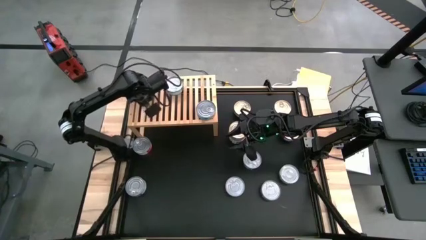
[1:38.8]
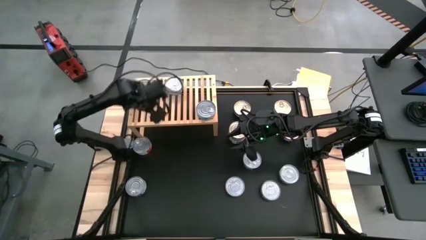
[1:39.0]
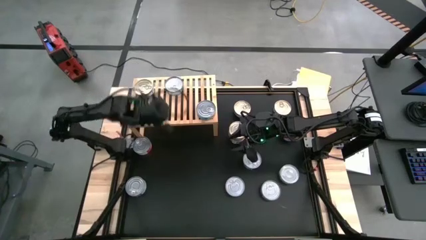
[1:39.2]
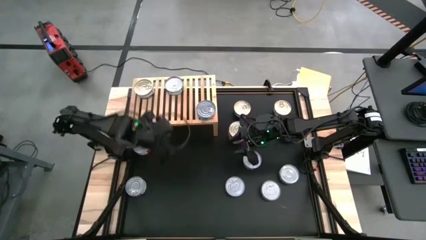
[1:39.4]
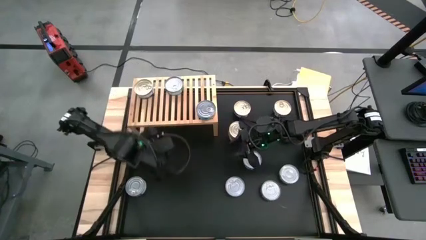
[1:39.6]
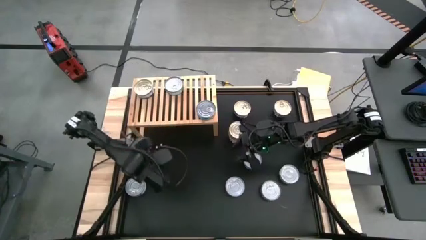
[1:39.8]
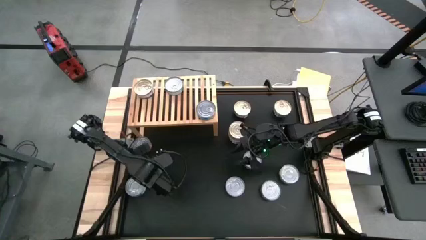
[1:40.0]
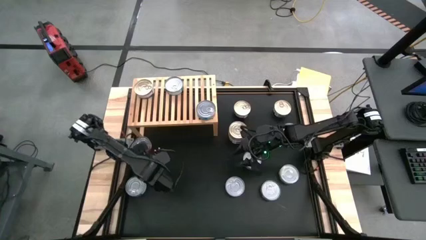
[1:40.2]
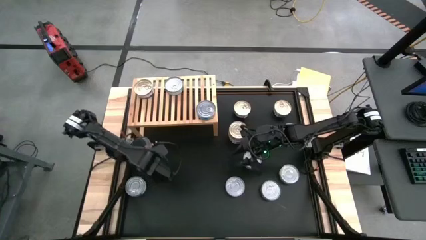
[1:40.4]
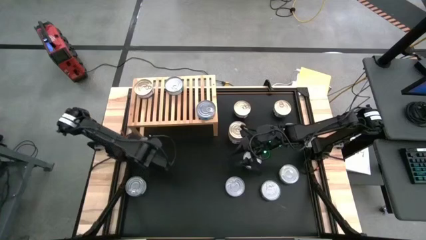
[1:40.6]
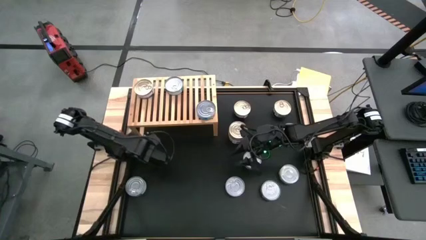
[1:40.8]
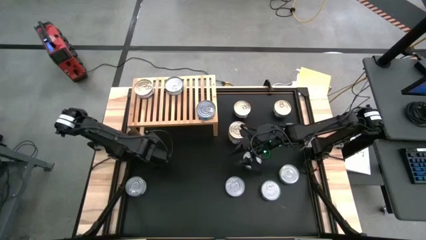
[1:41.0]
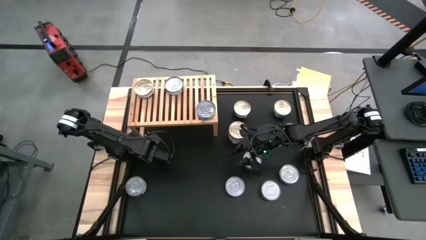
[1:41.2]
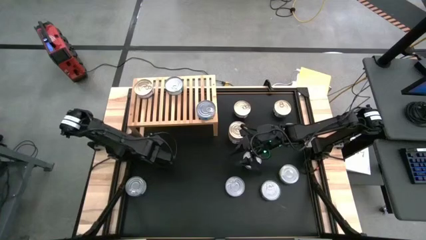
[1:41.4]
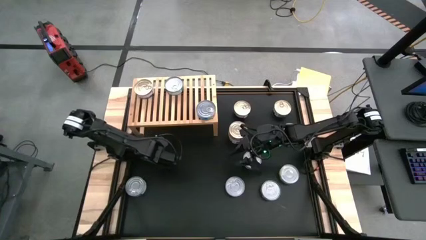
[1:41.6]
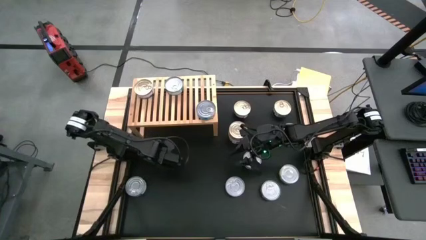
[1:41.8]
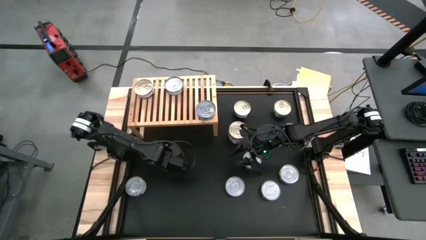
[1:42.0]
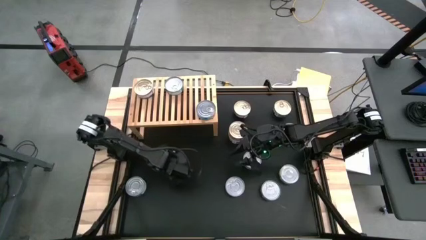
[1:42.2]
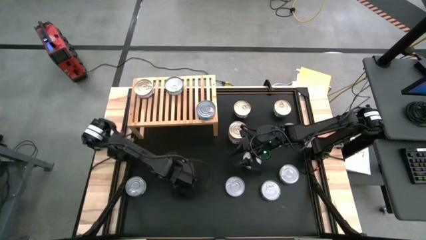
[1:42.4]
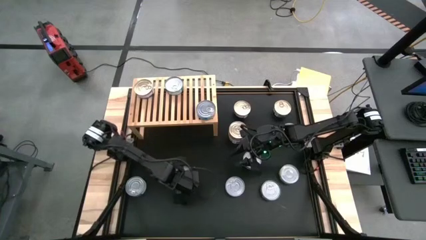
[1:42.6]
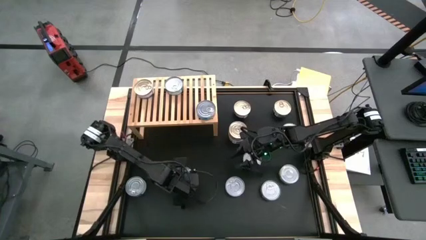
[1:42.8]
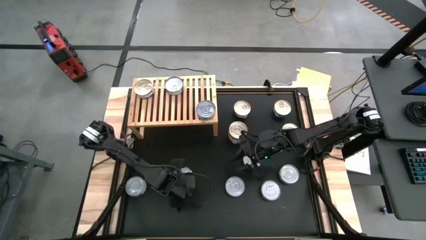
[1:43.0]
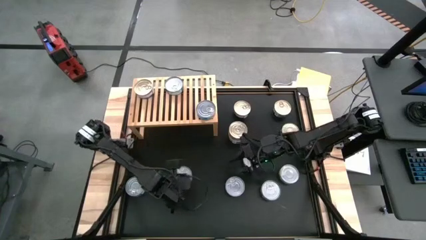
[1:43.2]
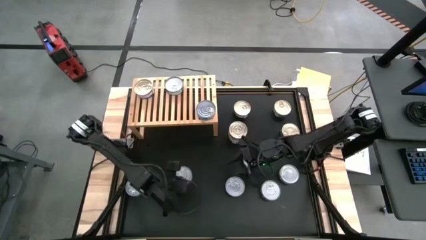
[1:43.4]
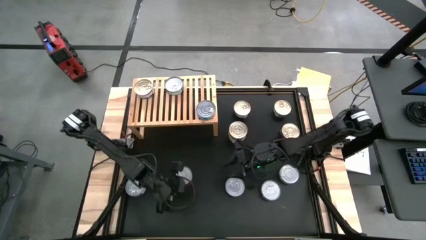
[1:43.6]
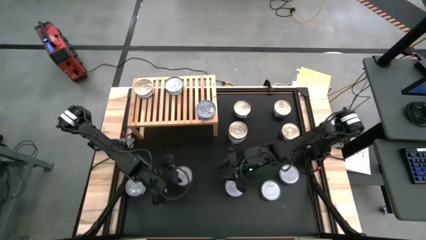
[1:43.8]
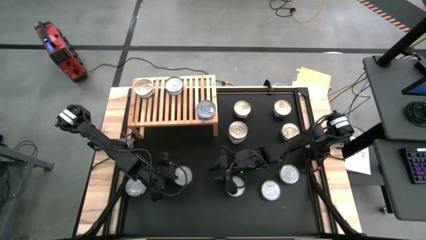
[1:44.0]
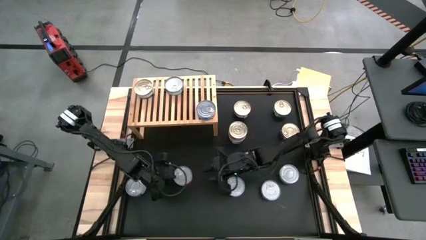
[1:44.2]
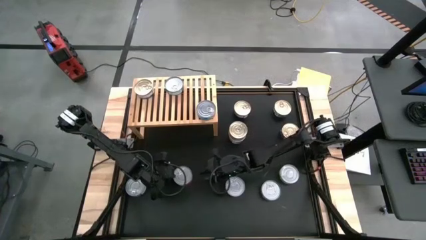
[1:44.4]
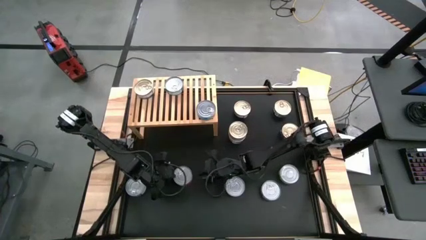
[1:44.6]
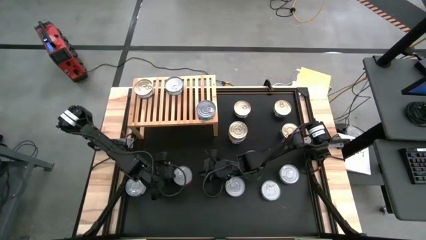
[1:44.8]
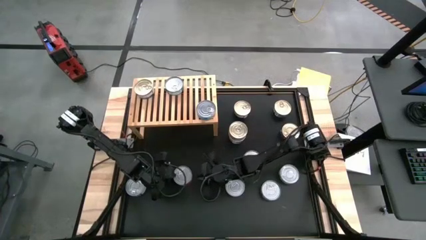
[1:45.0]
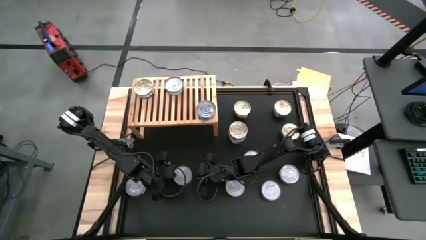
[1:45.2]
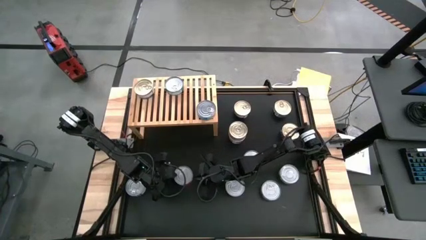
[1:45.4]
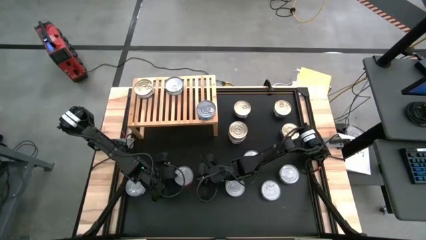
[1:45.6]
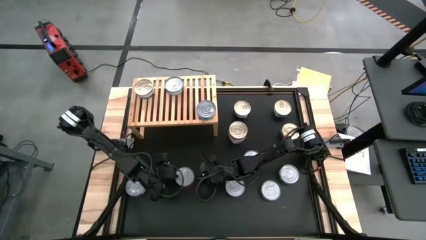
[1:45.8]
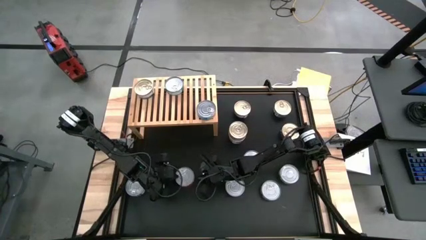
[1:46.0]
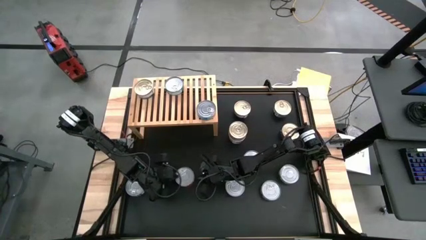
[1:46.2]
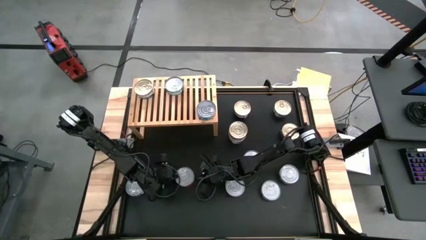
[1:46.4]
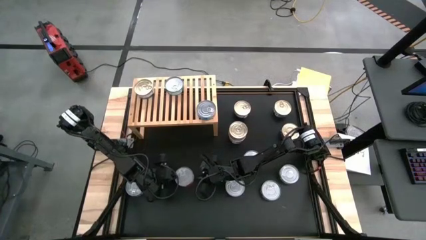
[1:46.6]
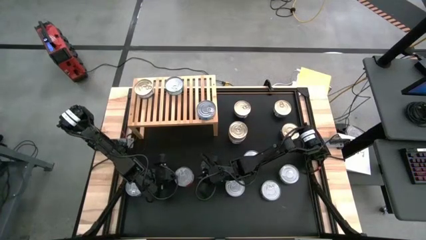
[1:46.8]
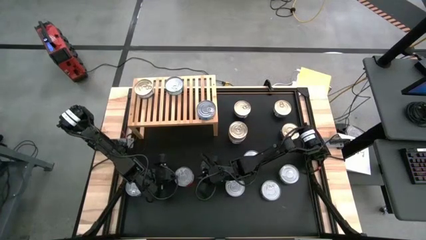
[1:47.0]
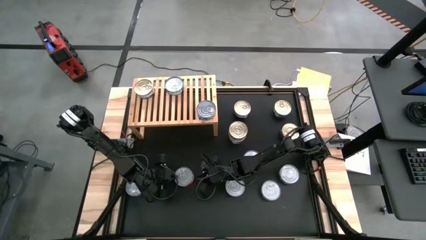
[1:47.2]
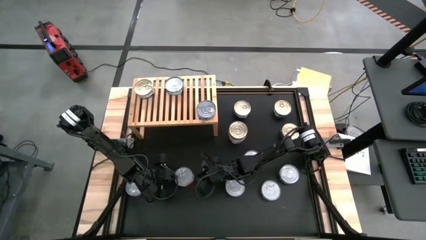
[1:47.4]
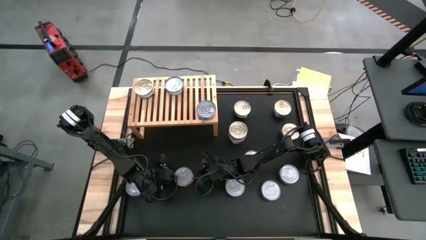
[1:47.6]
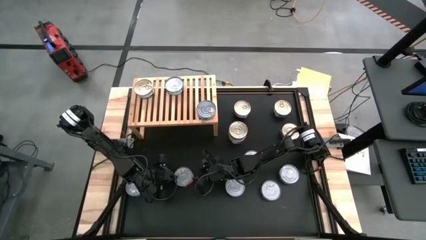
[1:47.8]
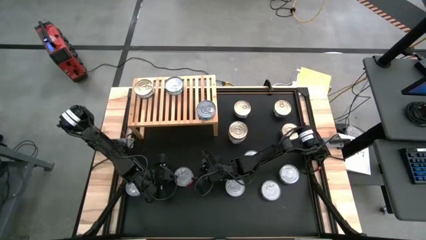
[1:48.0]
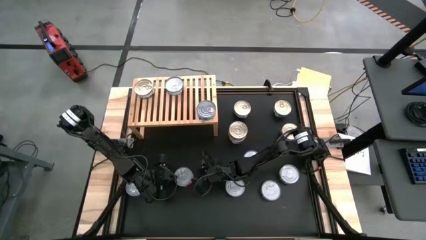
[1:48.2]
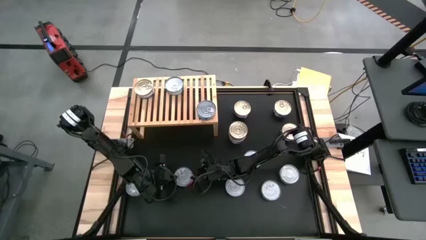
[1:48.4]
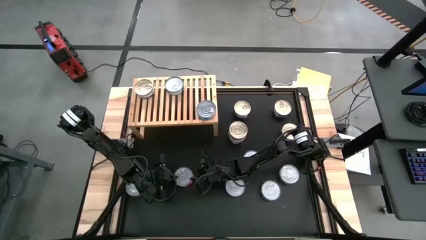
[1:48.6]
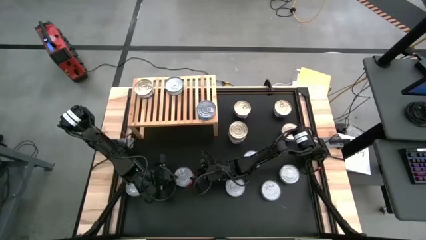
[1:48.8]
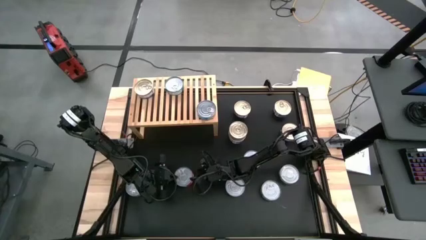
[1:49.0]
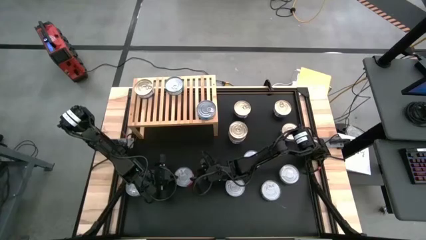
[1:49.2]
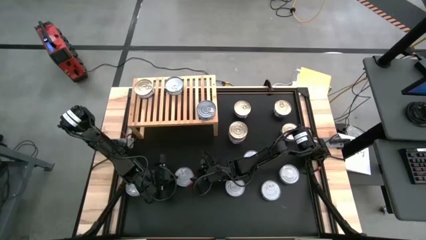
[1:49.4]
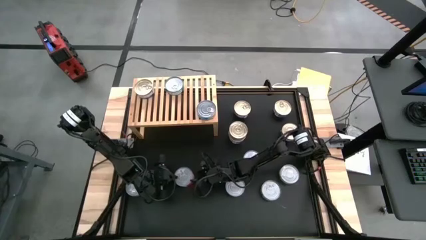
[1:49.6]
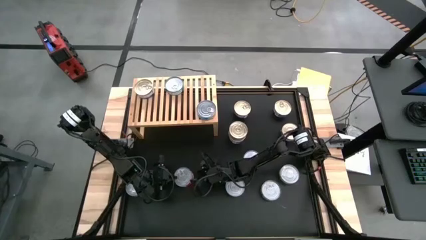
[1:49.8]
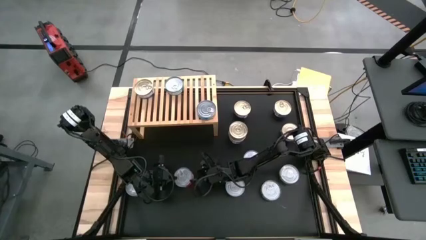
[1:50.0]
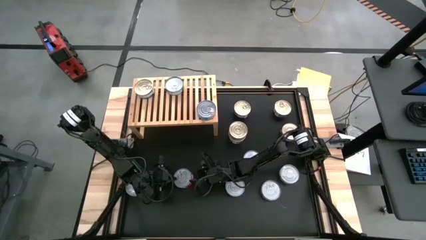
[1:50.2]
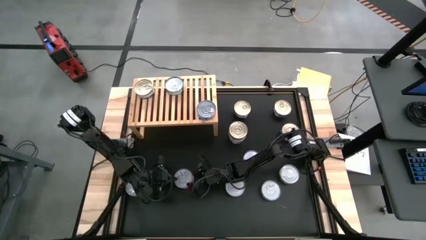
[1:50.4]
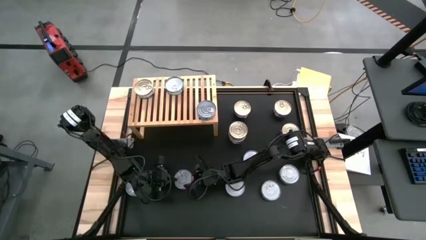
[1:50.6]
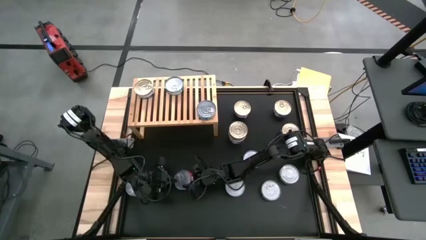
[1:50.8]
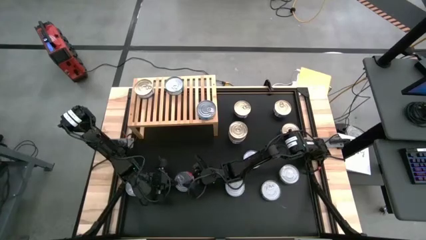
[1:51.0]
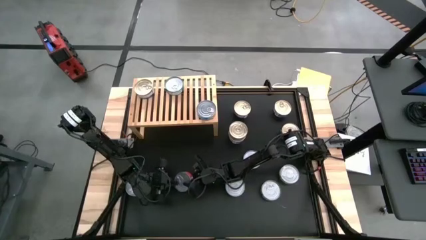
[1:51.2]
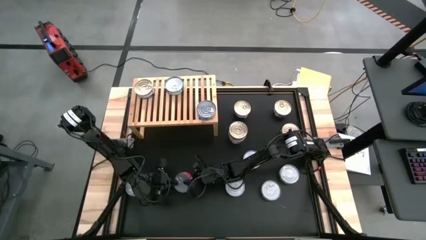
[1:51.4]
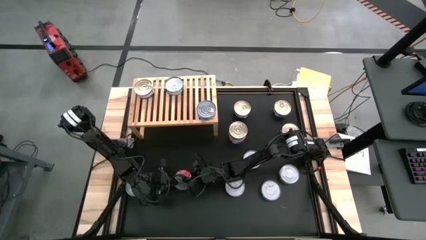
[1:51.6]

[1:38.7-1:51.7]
Task: Stack canned seafood by type on shelf
Put the red tuna can on the shelf

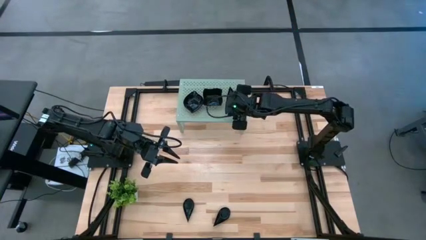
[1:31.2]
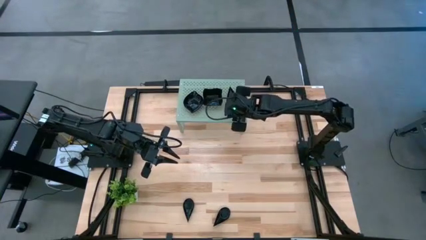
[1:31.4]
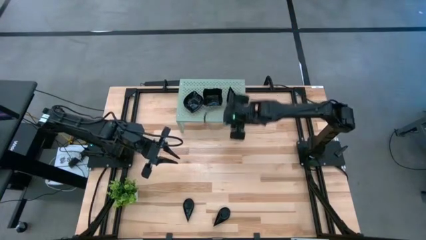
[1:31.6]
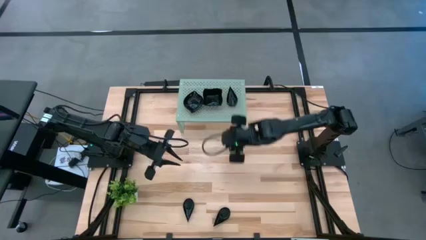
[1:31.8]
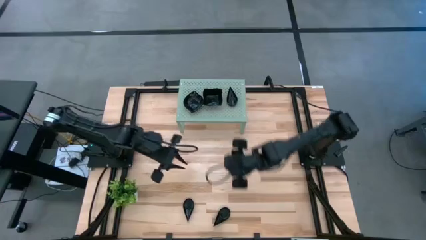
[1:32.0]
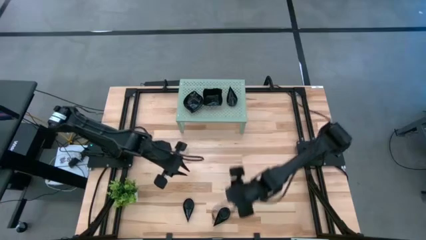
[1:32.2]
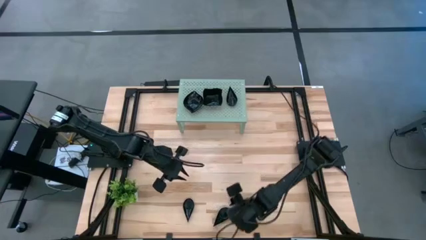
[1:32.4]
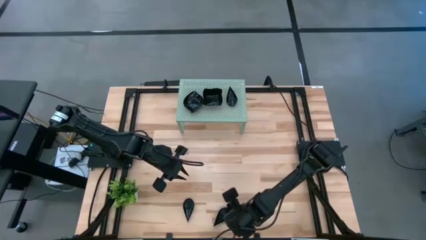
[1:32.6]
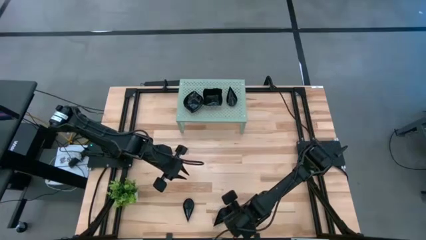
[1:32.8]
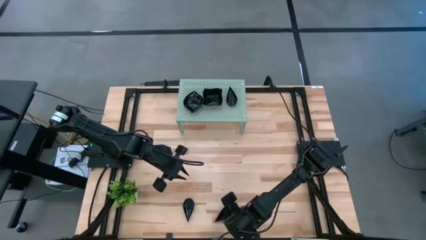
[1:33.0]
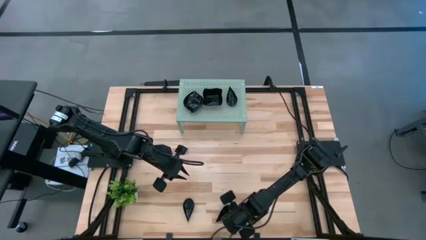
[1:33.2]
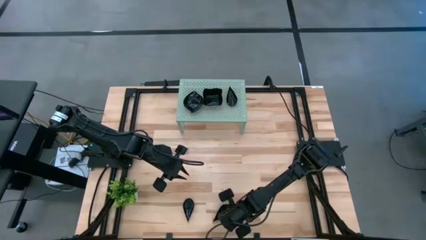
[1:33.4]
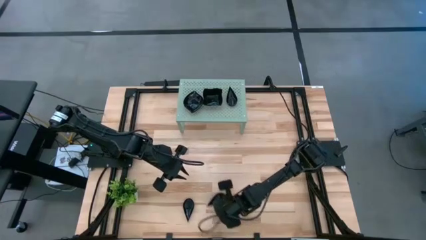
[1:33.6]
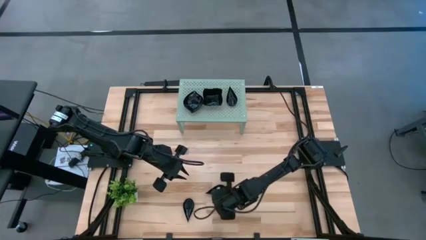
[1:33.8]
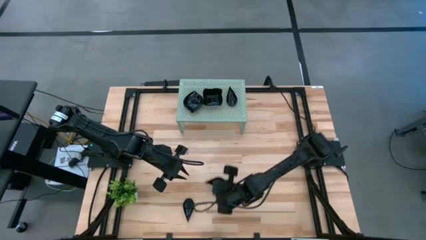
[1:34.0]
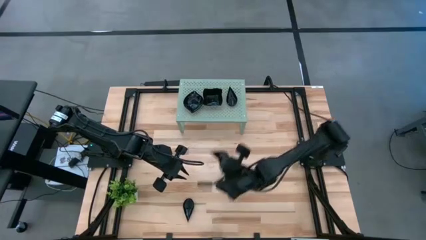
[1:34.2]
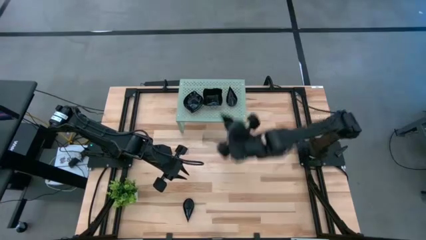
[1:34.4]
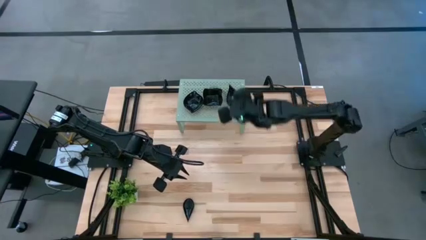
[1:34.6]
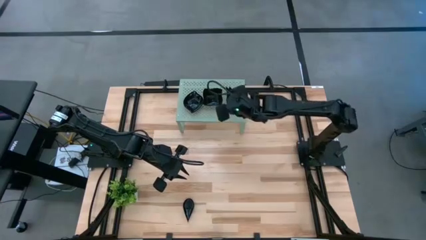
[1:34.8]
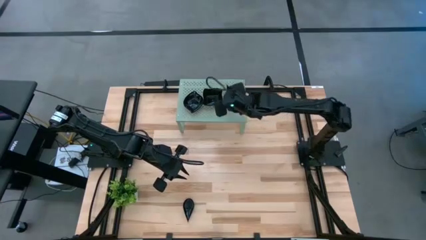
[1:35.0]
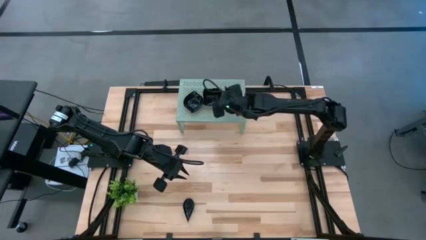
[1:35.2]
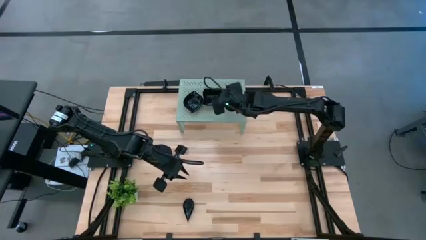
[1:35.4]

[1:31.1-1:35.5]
Task: Pick & Place Mini shaped plates
Stack the drop-shaped plate on top of the other drop-shaped plate on the shelf
